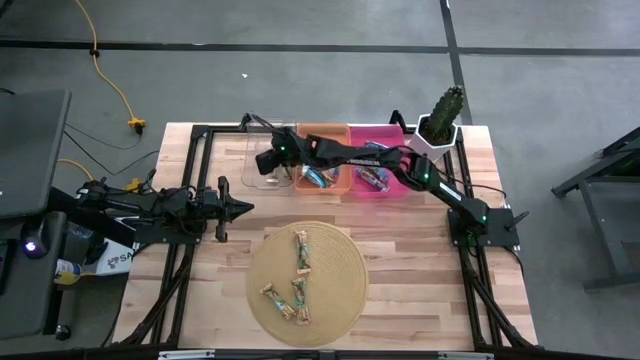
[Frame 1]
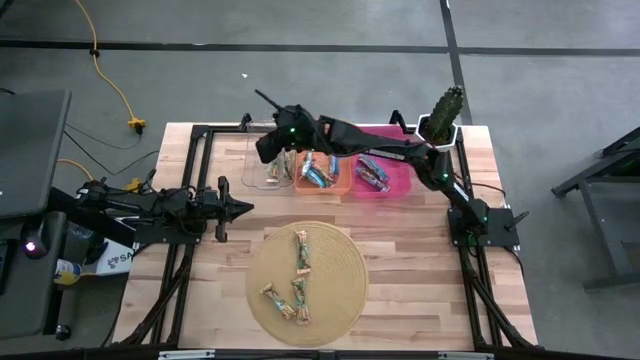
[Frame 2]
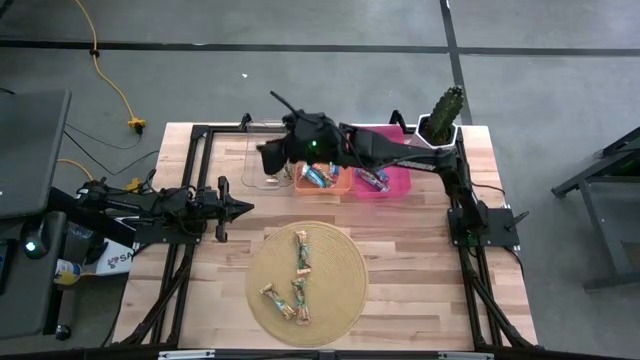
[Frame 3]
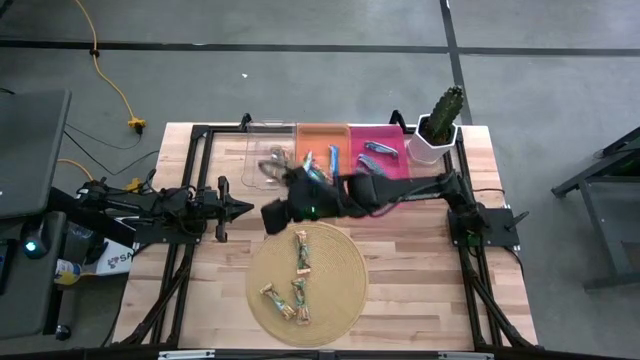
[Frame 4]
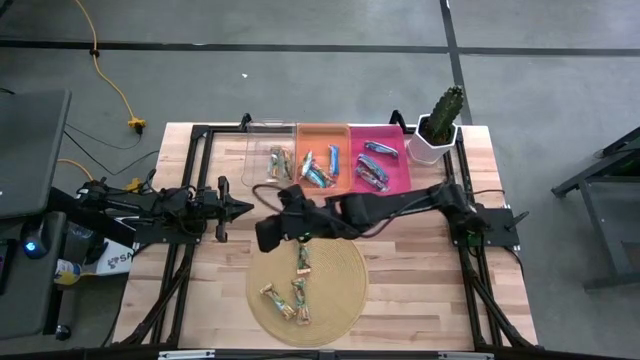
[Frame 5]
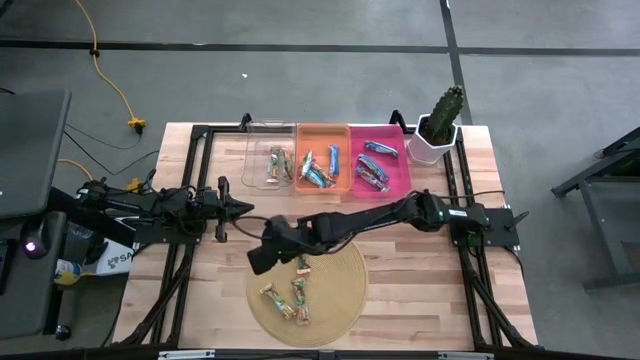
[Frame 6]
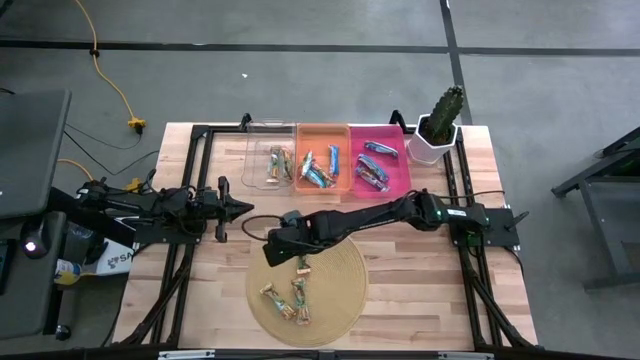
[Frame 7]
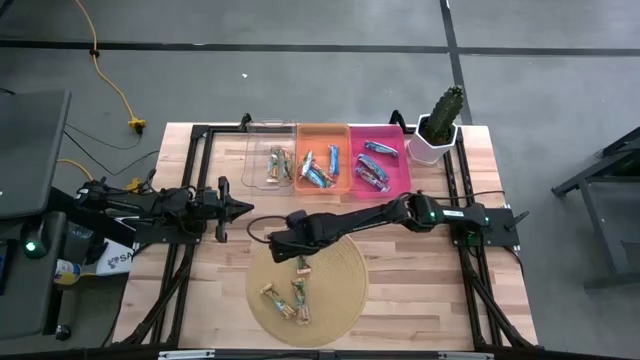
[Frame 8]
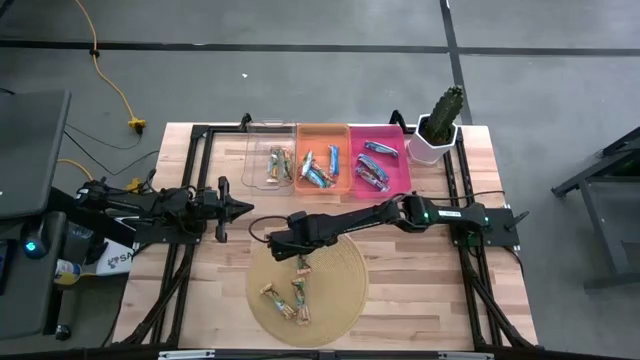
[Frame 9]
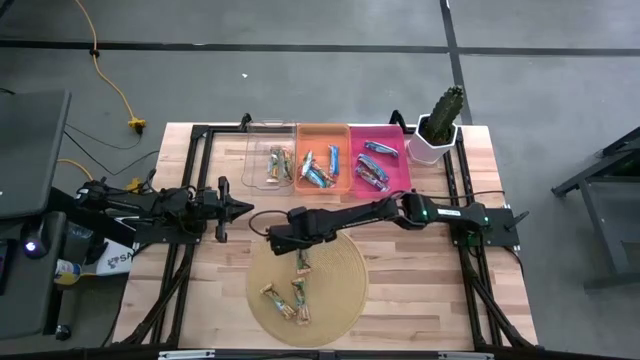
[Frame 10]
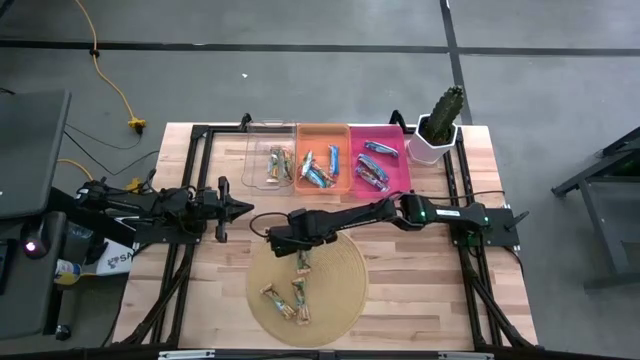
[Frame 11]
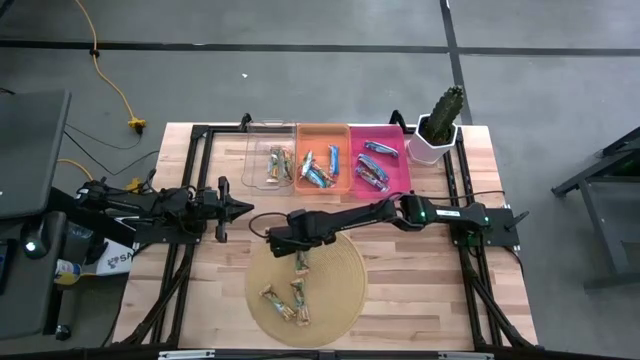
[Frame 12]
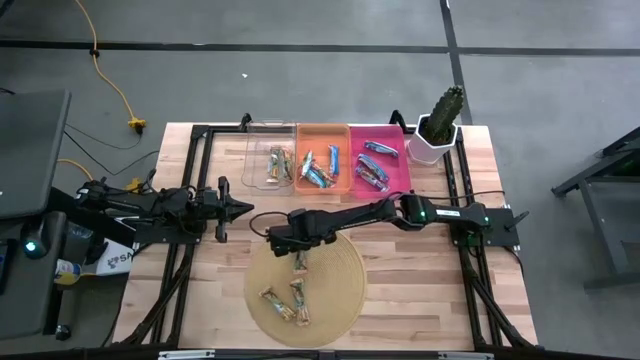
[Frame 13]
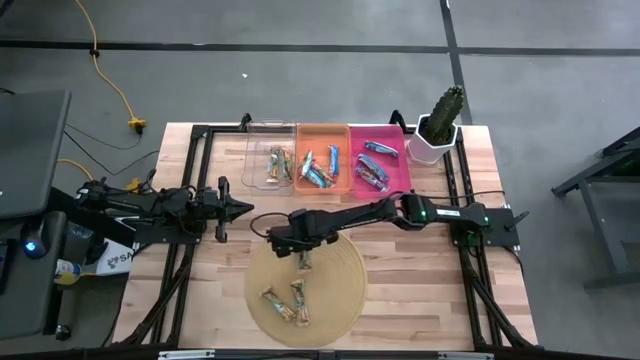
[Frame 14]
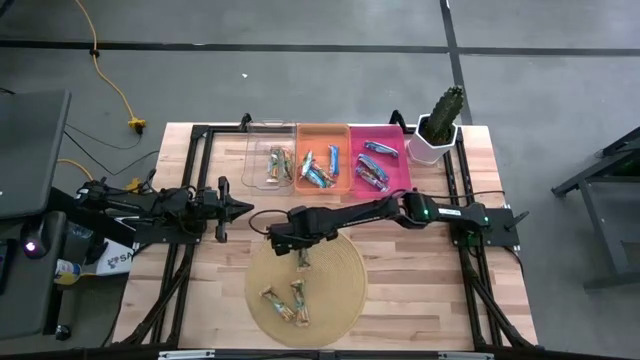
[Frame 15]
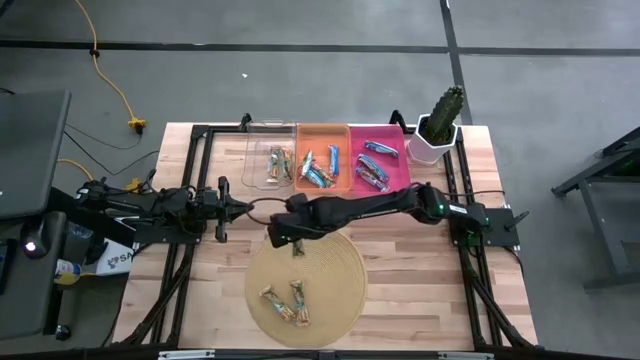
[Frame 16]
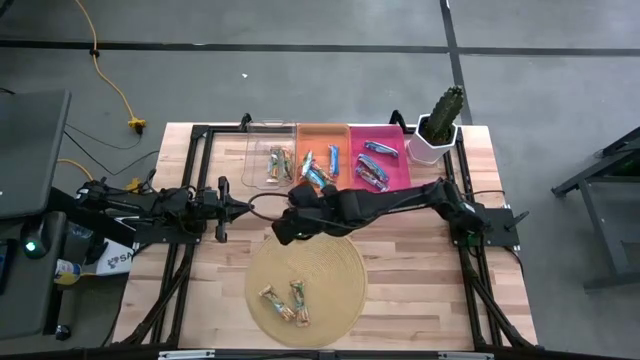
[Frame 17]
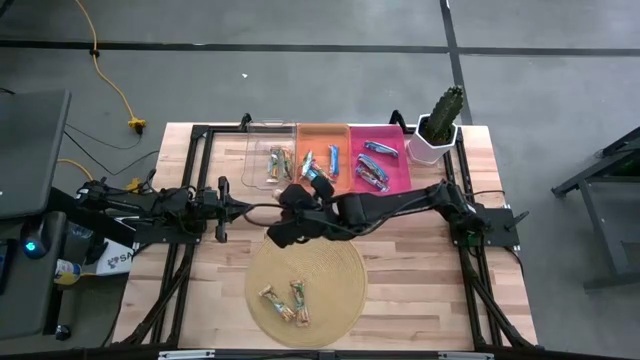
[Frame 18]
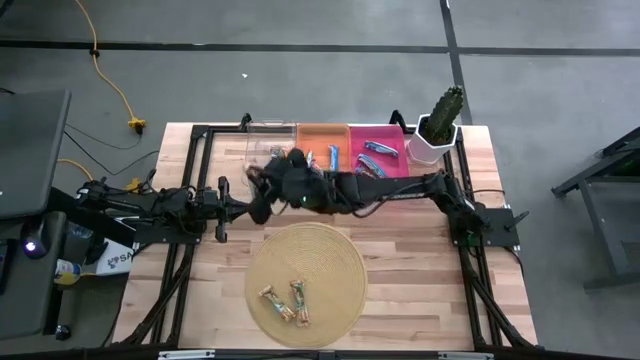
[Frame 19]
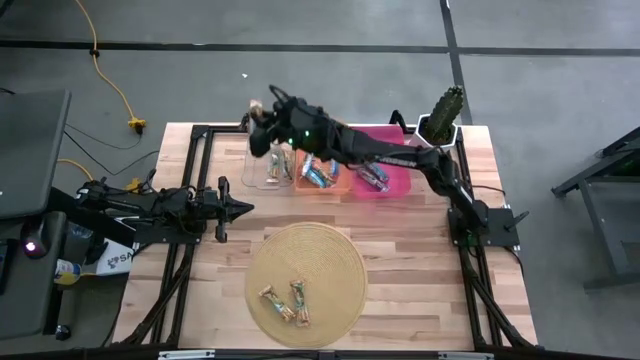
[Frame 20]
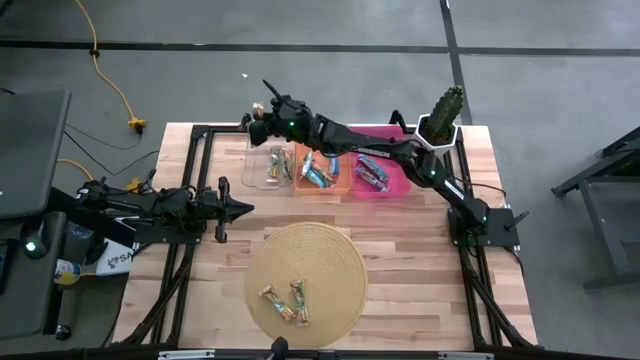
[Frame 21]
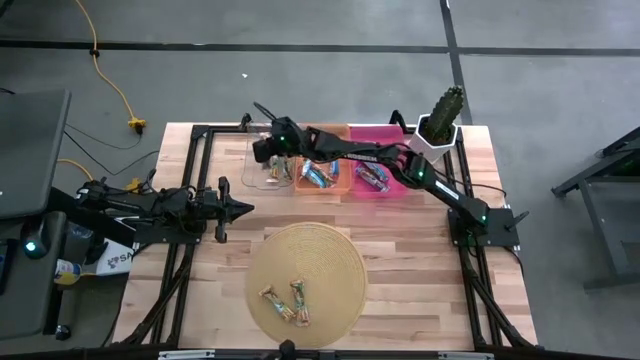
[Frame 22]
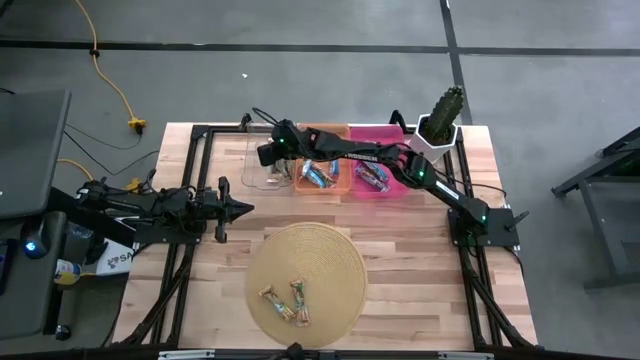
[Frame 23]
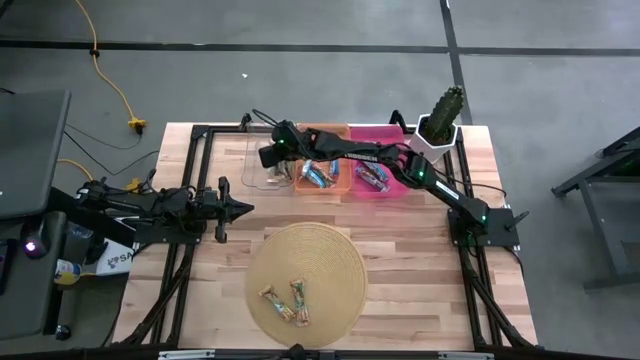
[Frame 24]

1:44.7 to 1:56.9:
Task: Pick and place Granola Bars by type
Put the yellow granola bar into the transparent bin

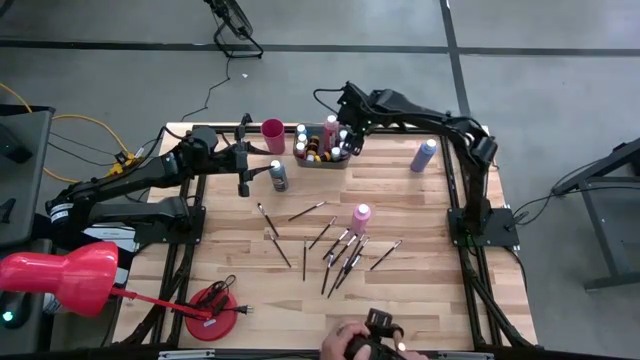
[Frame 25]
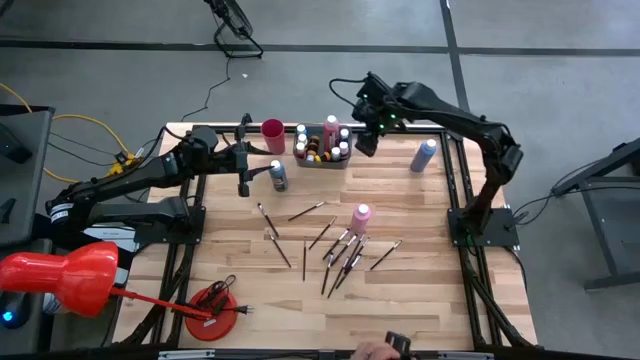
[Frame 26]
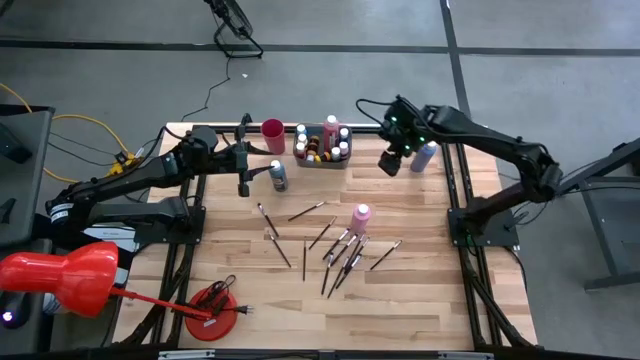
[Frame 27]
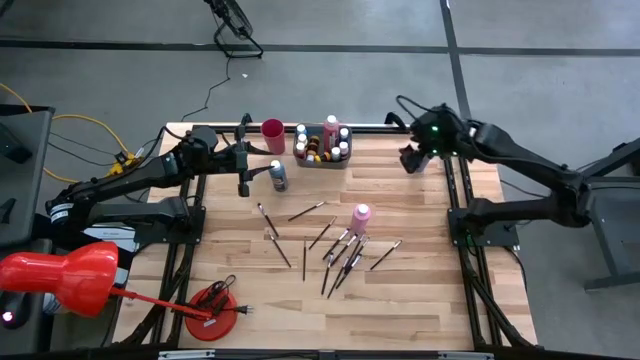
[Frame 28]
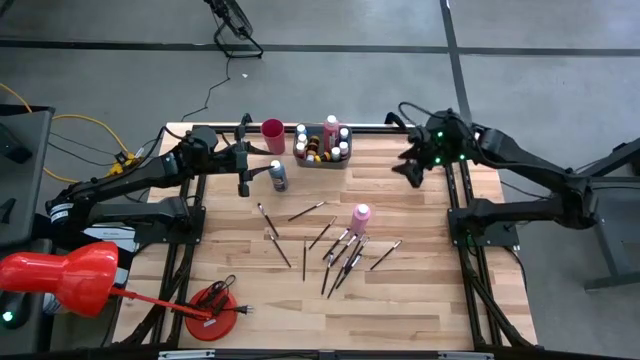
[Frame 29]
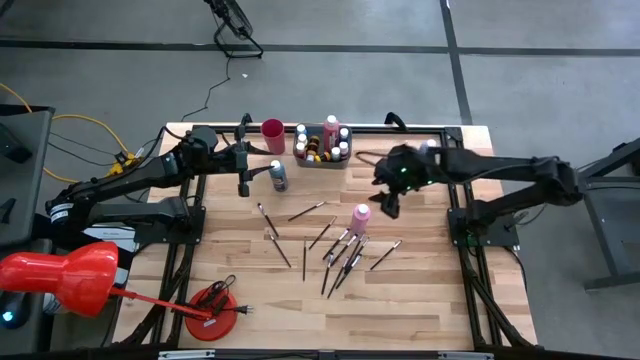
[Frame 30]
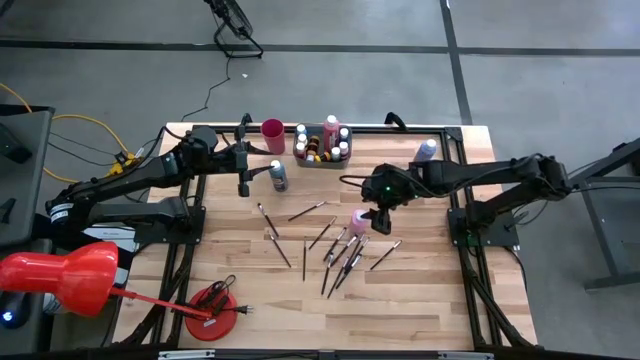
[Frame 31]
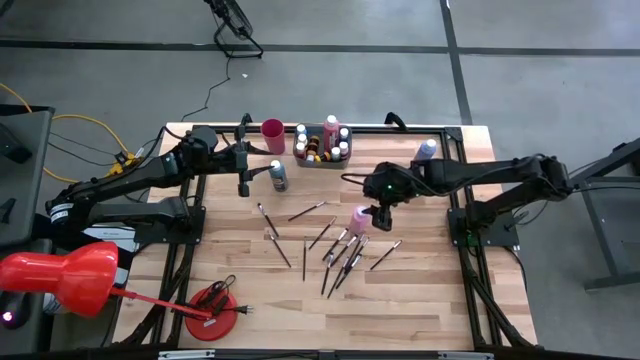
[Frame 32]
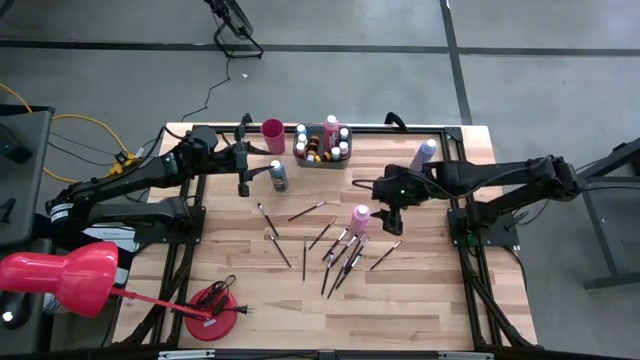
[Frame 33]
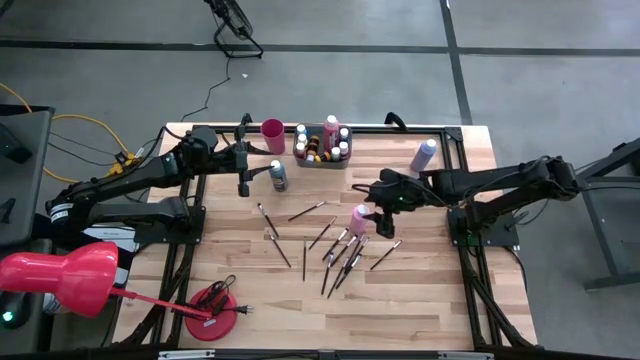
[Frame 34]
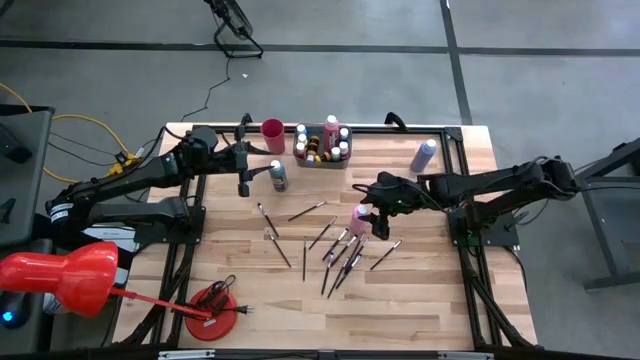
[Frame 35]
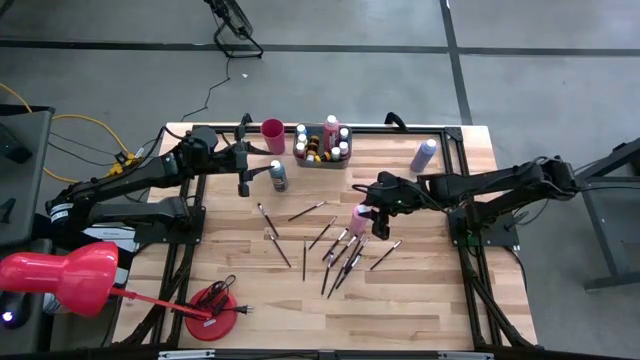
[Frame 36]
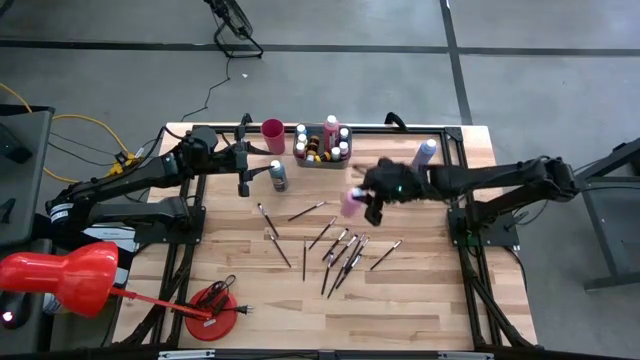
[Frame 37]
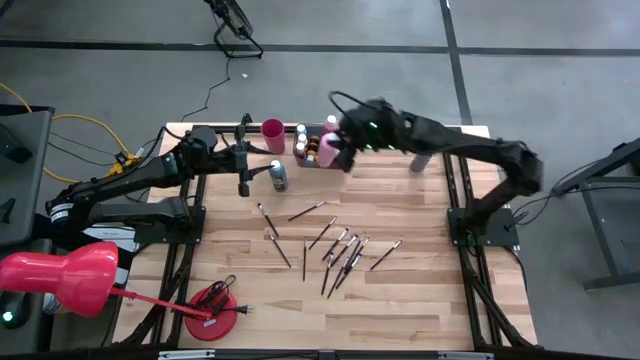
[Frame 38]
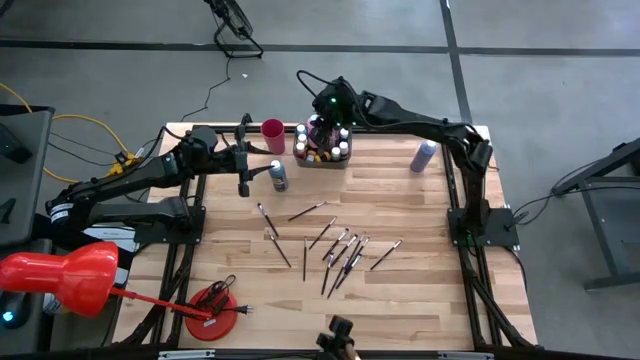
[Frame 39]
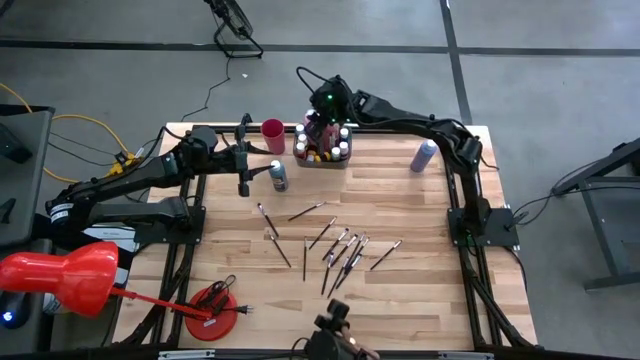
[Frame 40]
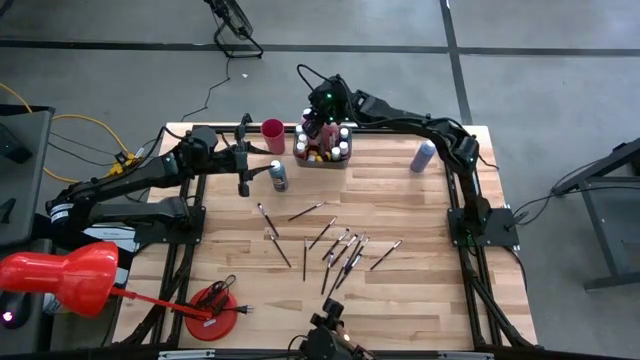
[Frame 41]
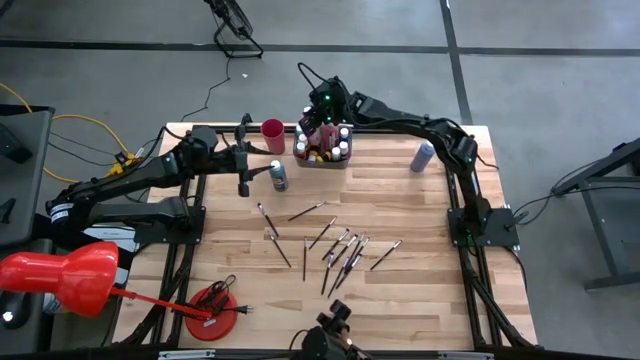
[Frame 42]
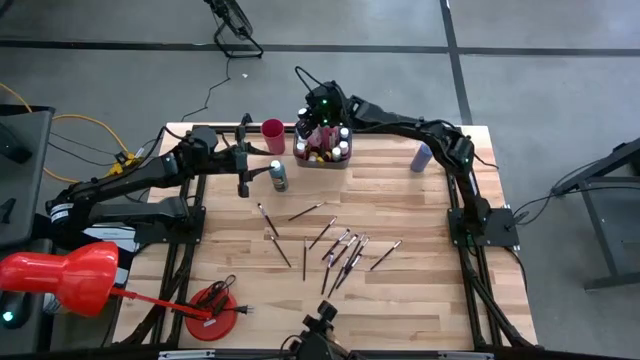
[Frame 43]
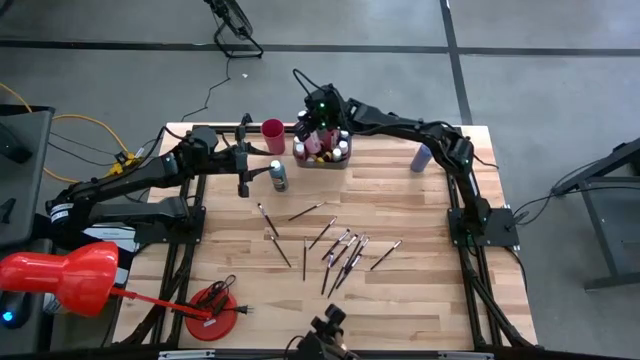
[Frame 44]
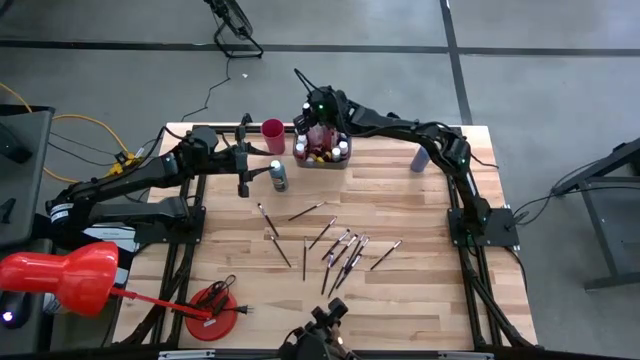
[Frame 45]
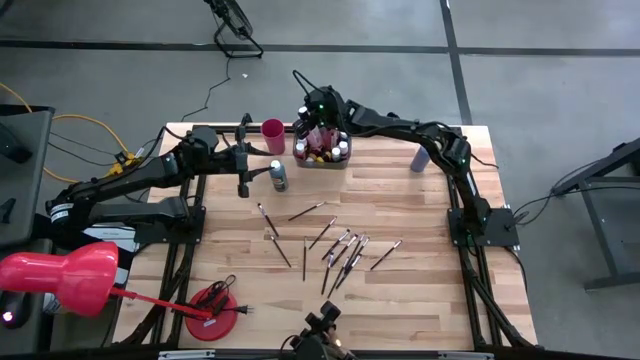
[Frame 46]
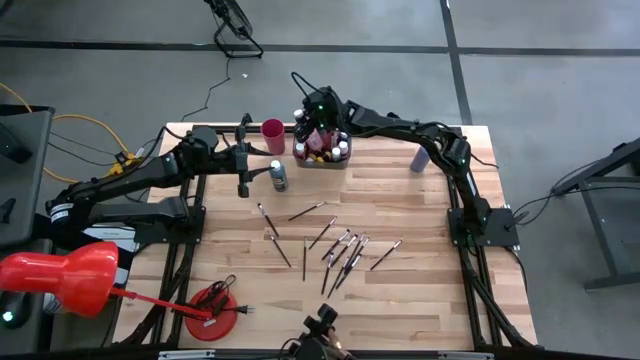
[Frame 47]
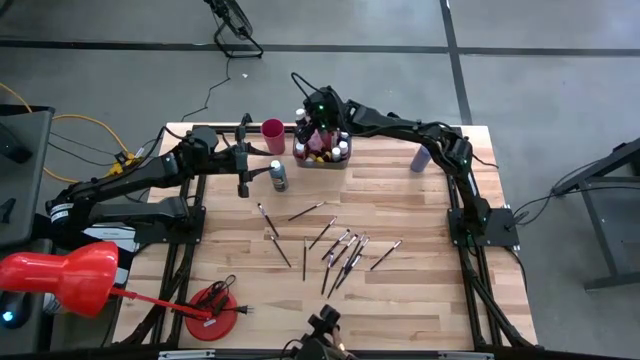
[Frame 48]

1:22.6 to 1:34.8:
Task: Pick & Place Paint Supplies
Put the big pink paint bottle into the black bin
